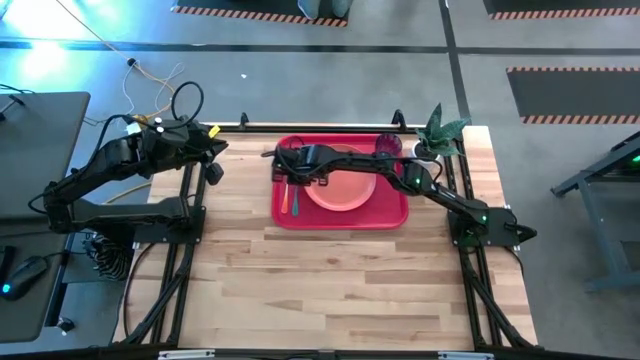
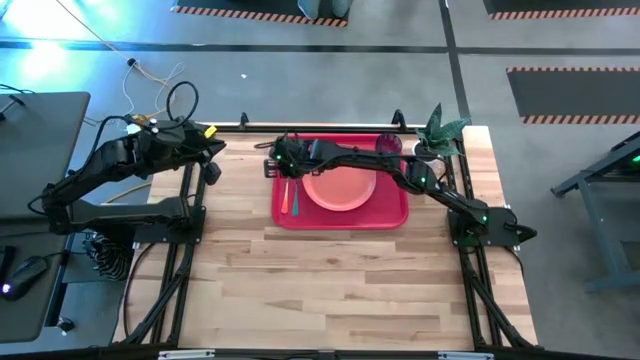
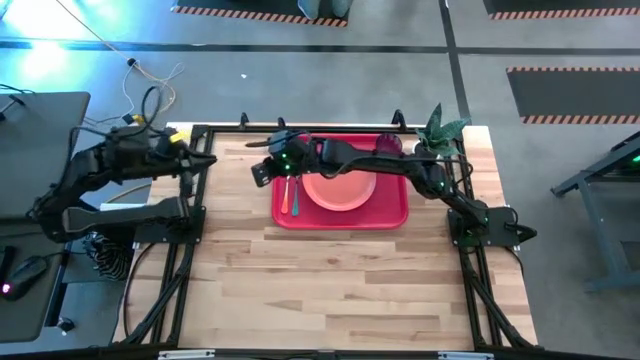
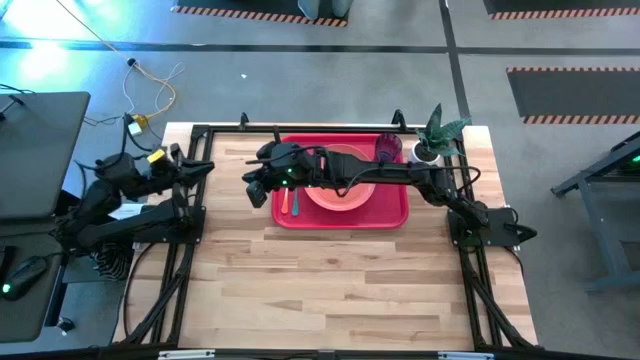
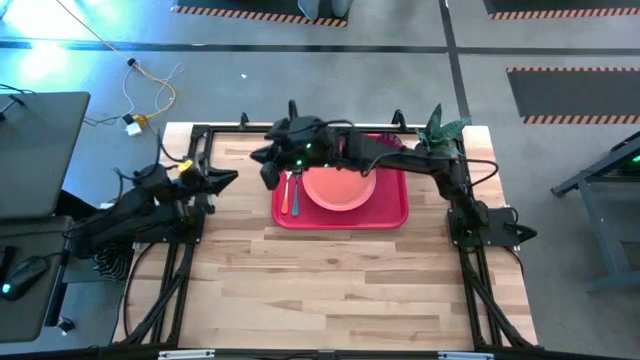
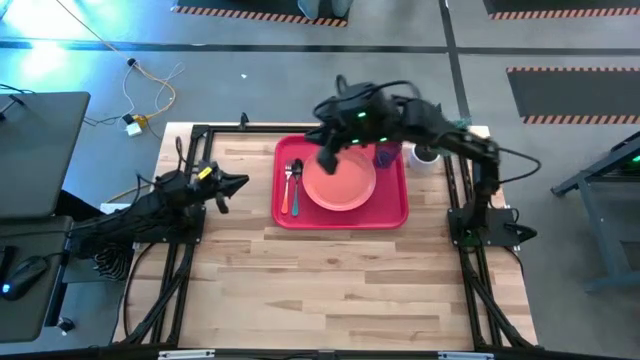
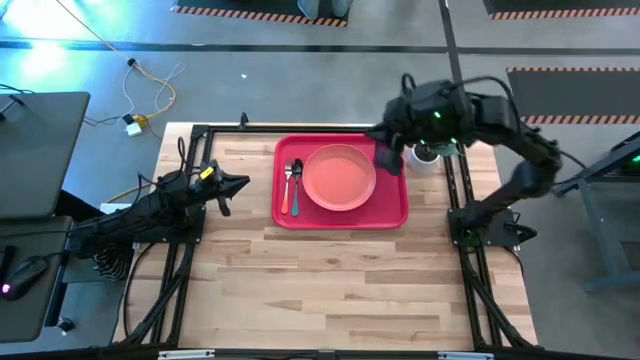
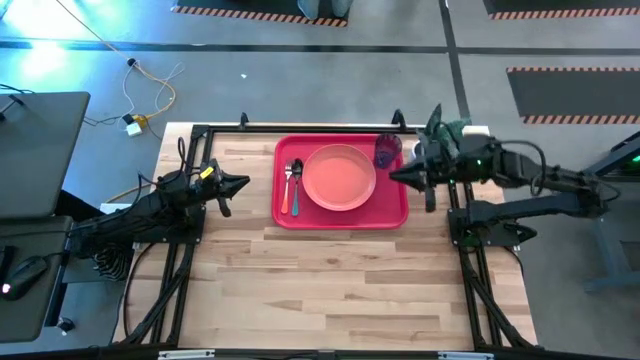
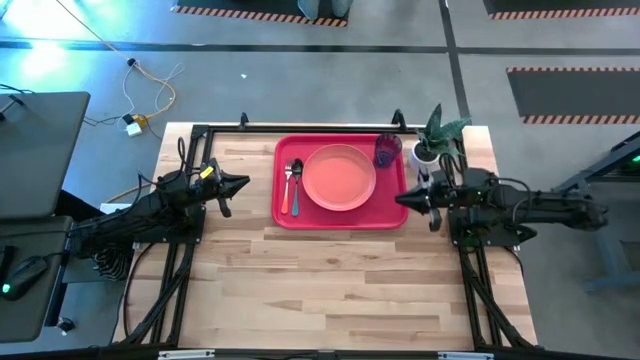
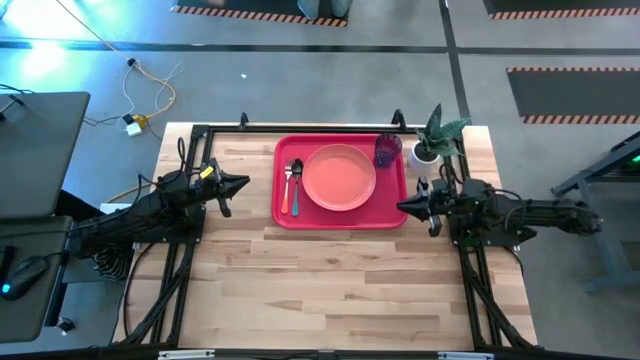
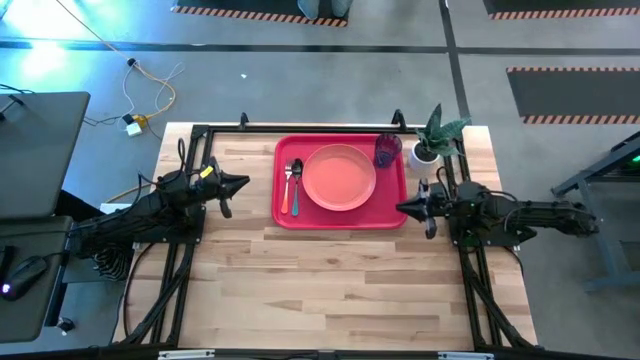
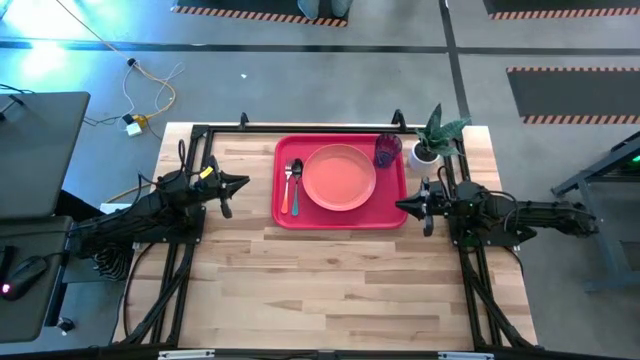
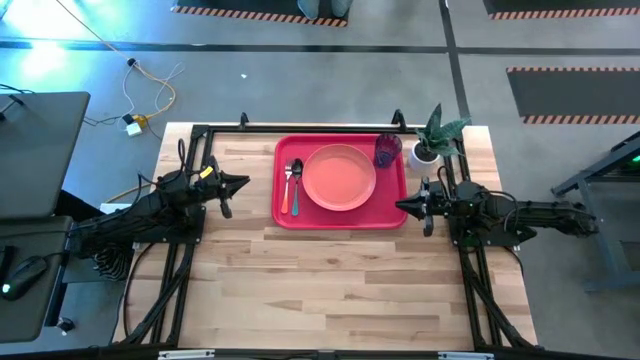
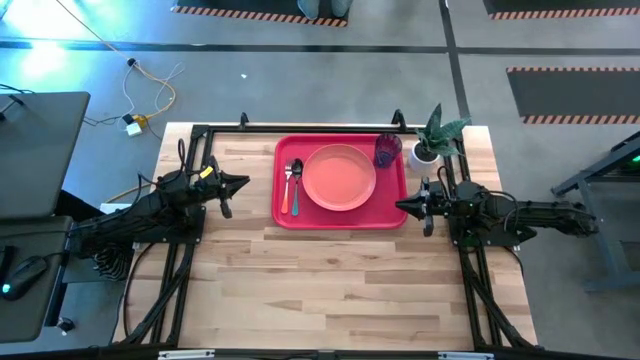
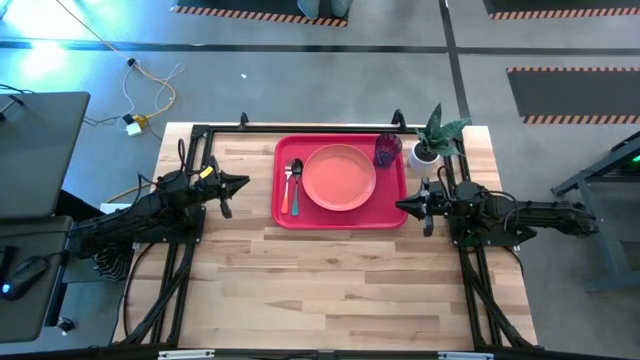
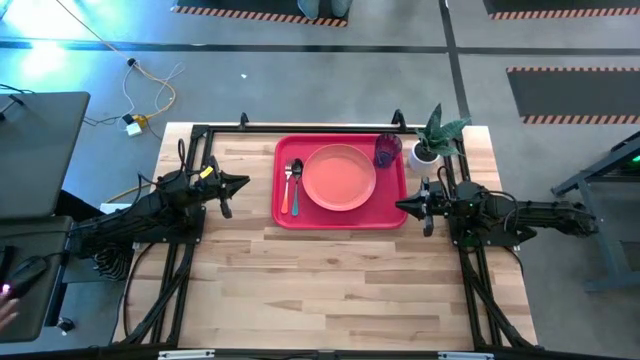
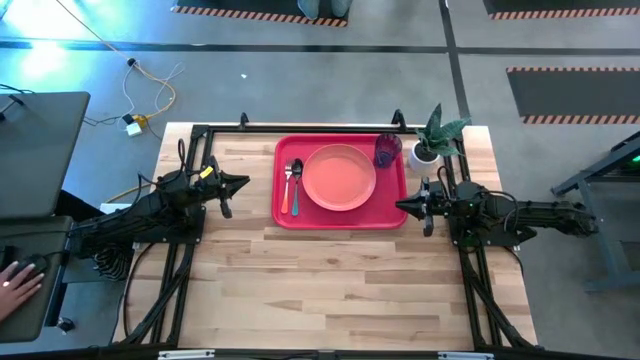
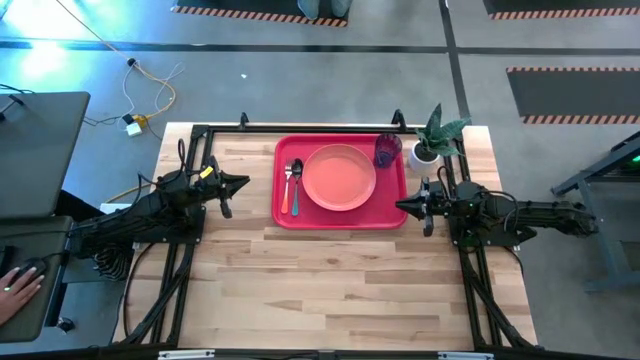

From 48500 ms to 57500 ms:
Task: Pick and place plate/cup/fork/spoon on tray
Return to Home Position

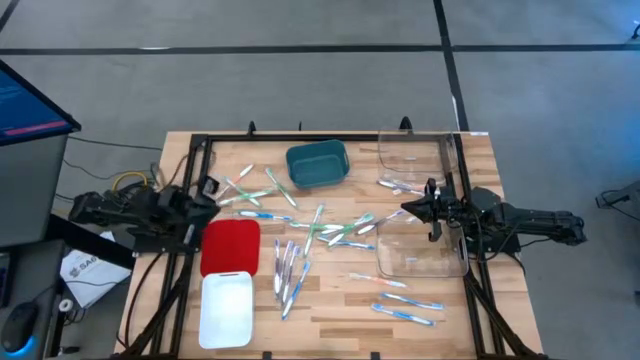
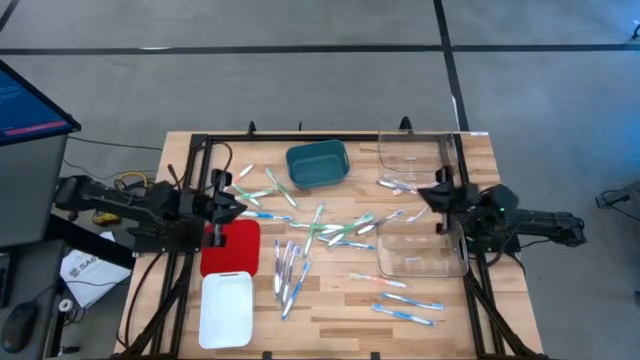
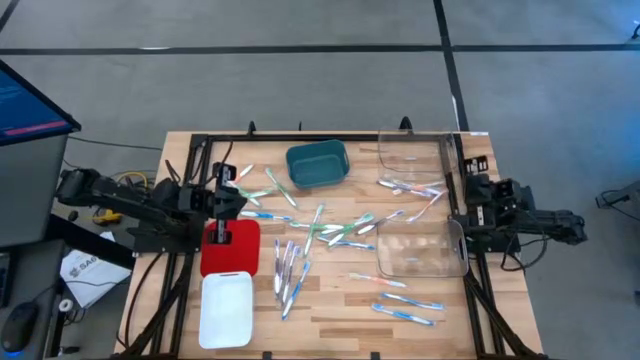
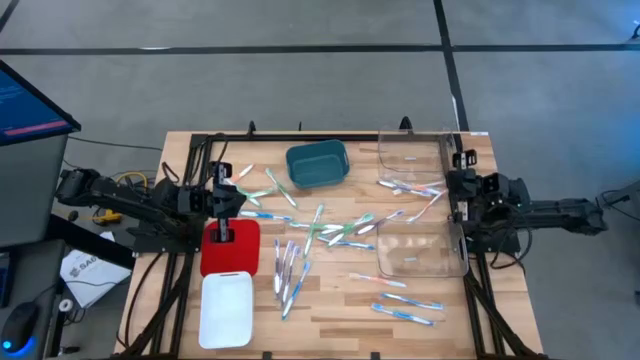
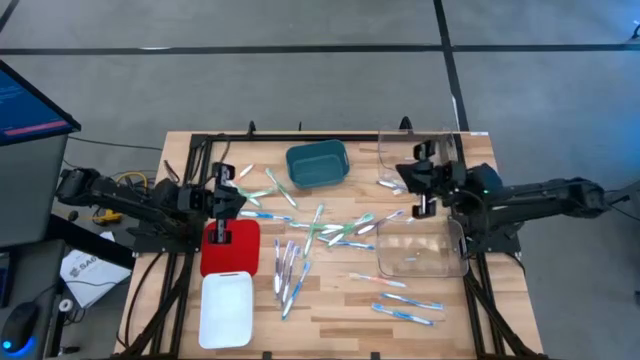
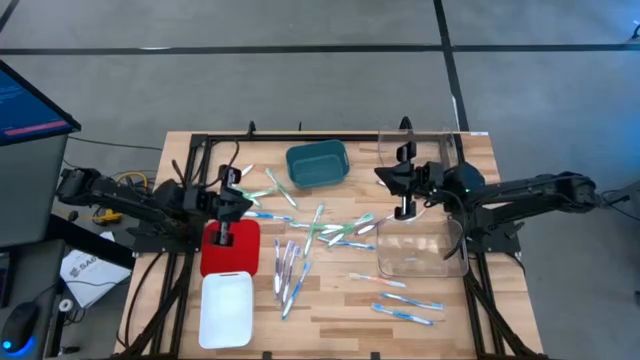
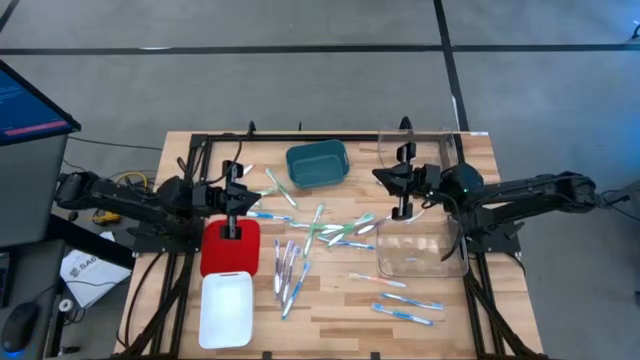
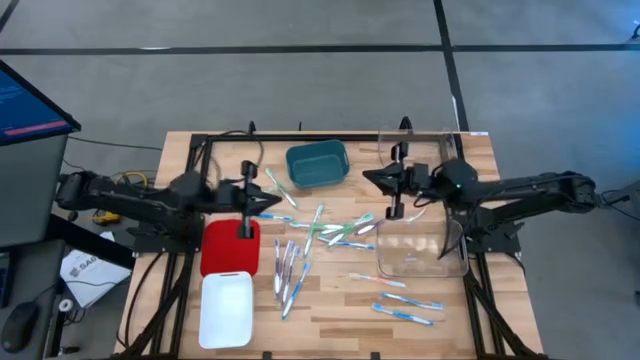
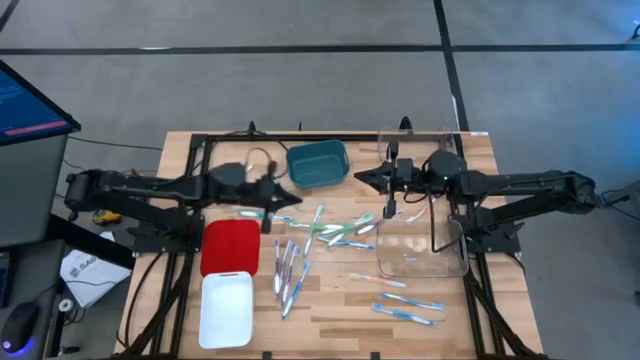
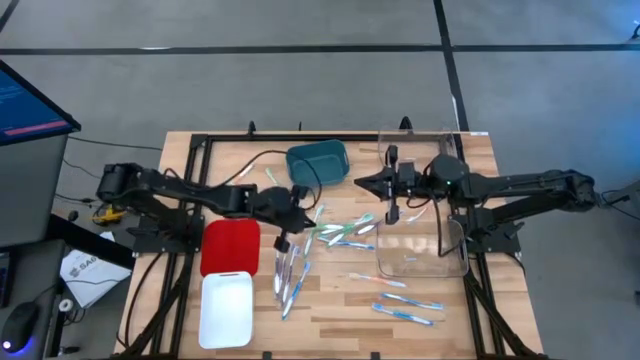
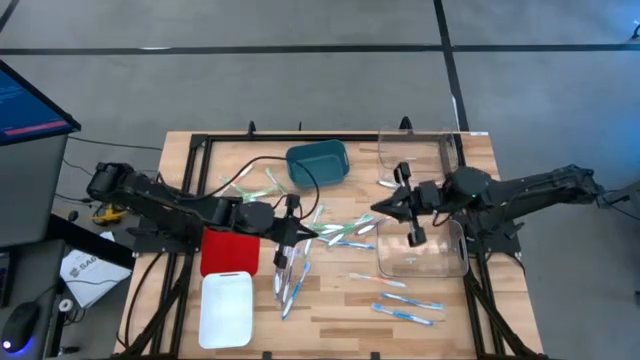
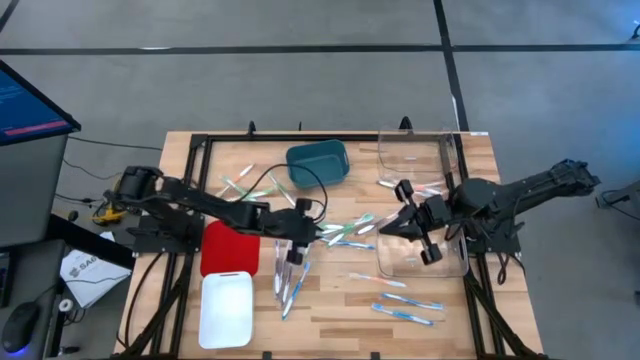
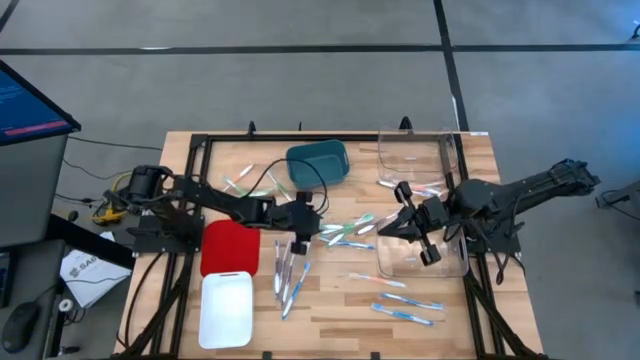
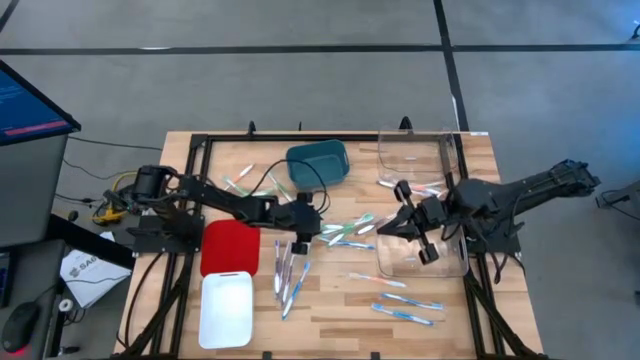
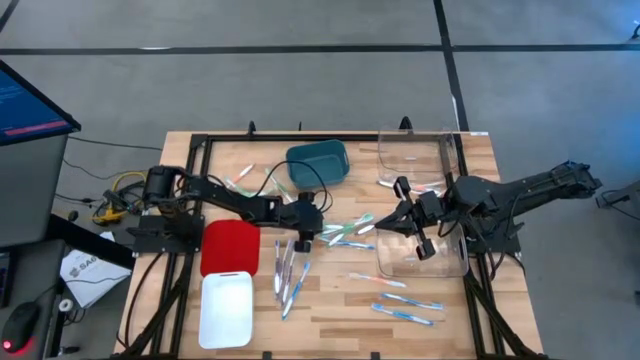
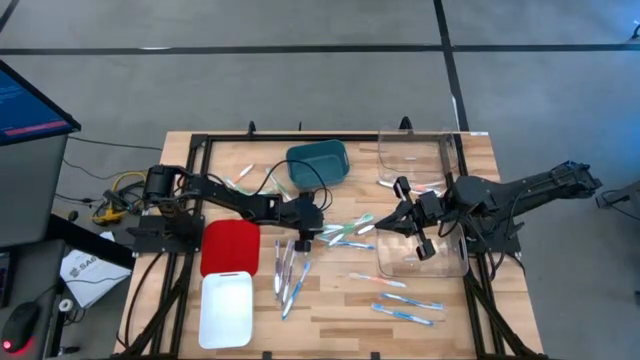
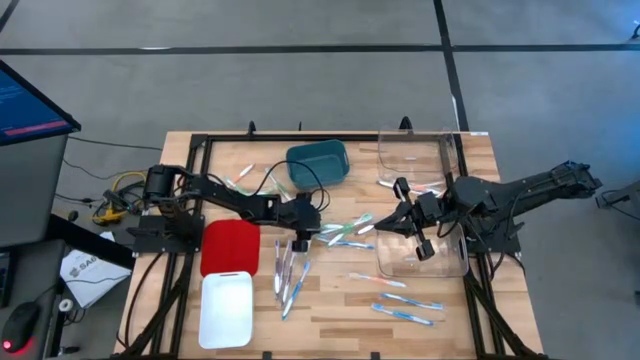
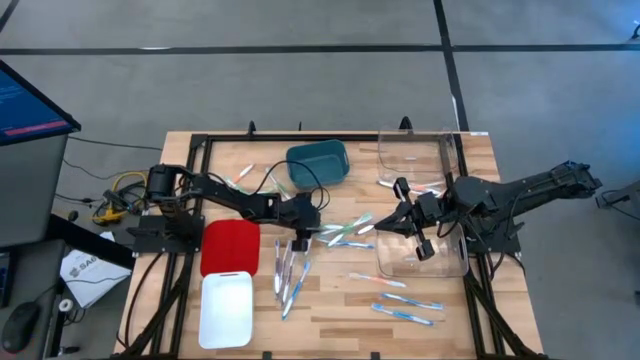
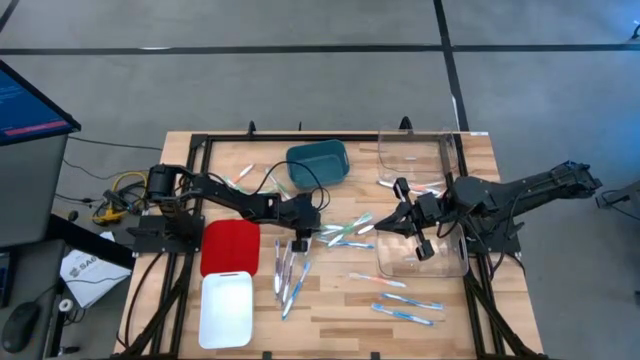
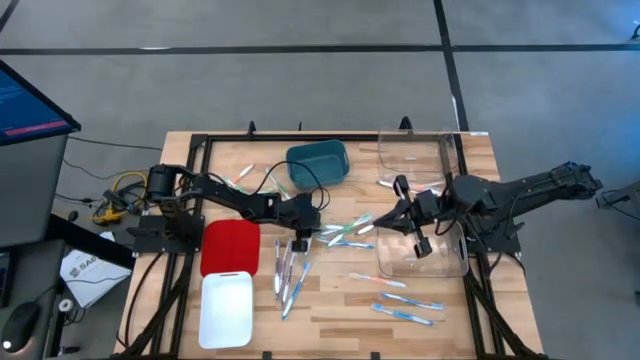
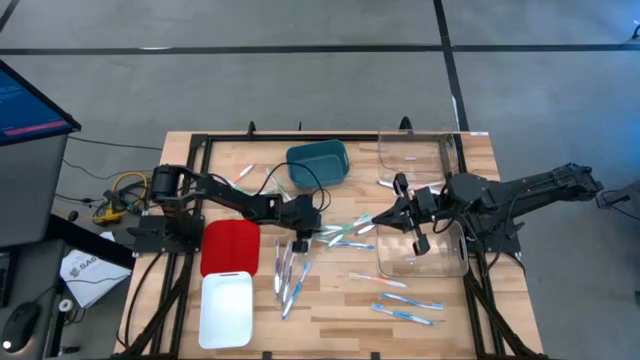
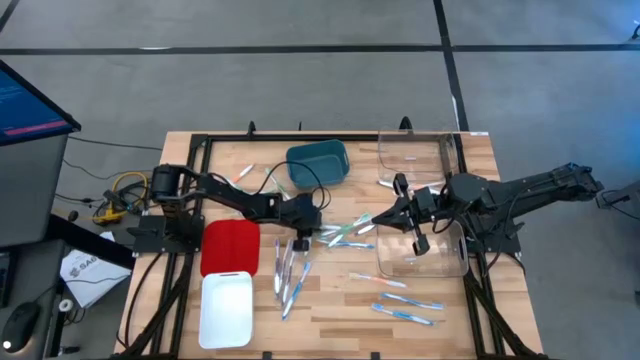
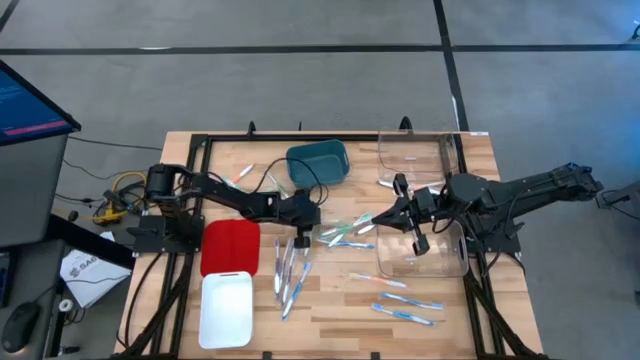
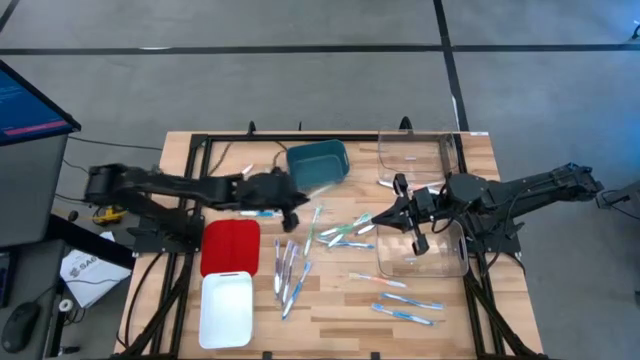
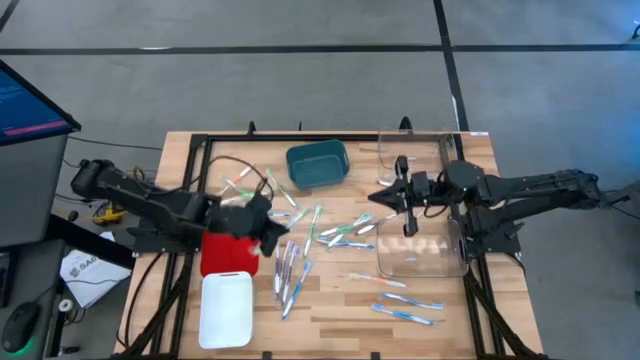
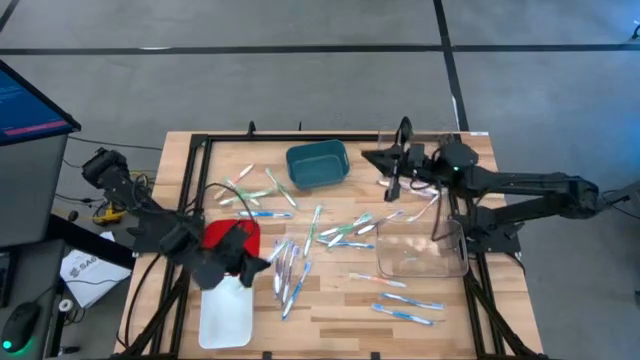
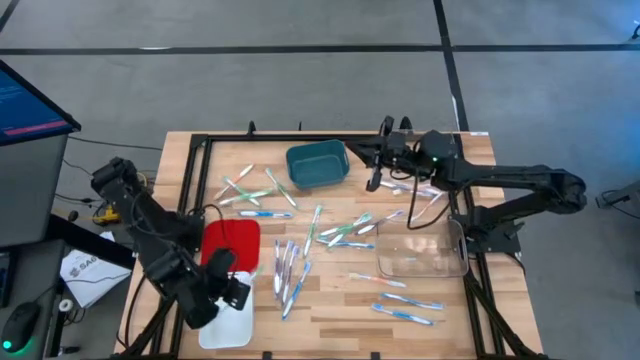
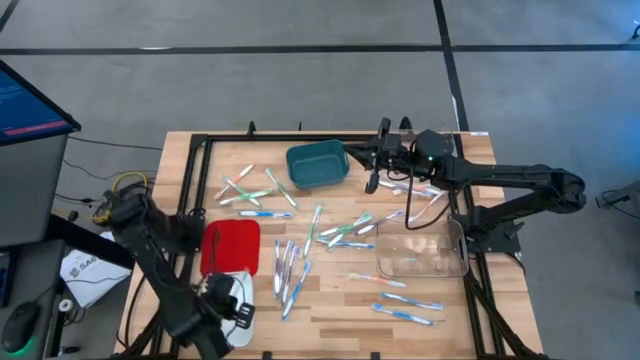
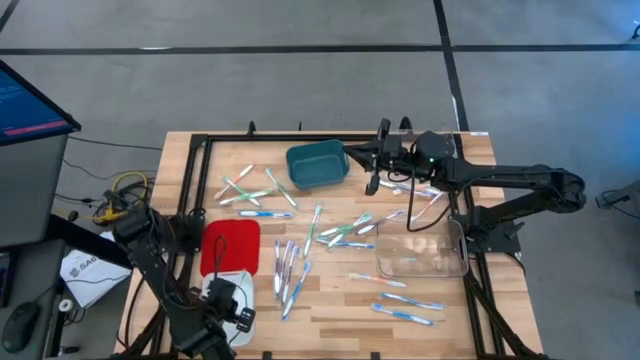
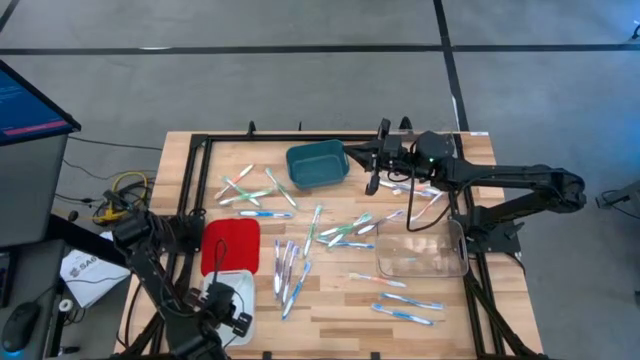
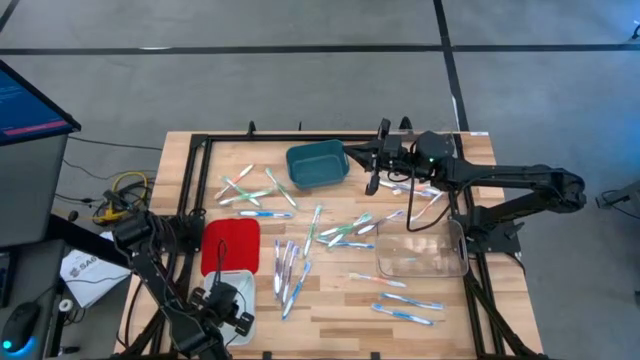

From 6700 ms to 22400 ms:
Task: Pick & Place Toothbrushes
Put the green toothbrush into the white bin
